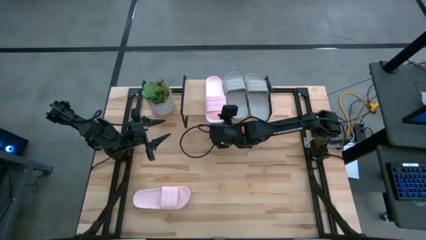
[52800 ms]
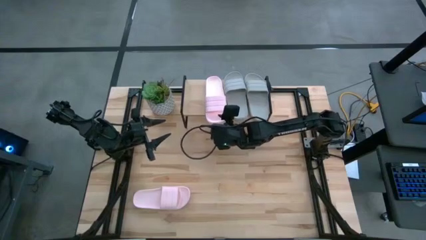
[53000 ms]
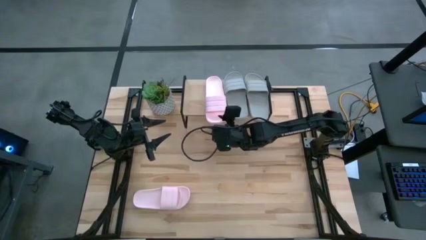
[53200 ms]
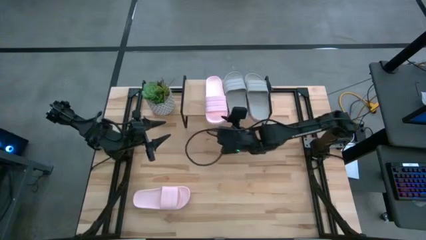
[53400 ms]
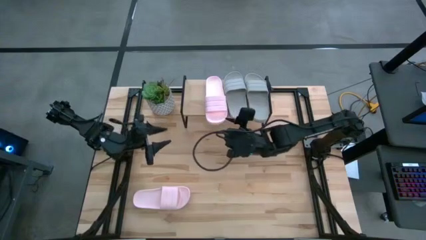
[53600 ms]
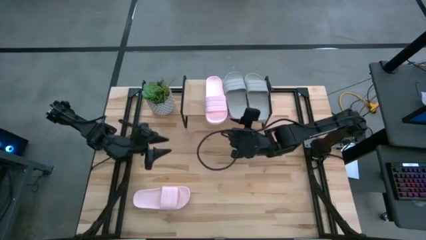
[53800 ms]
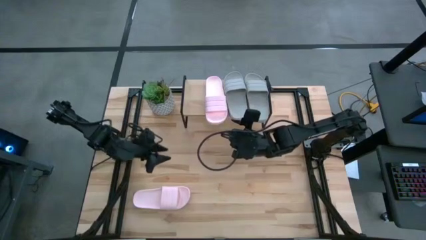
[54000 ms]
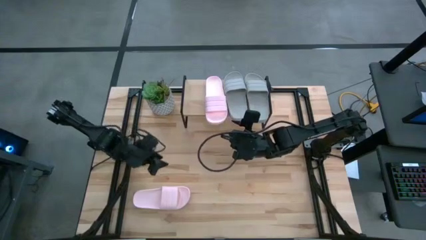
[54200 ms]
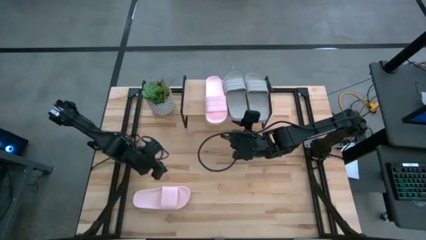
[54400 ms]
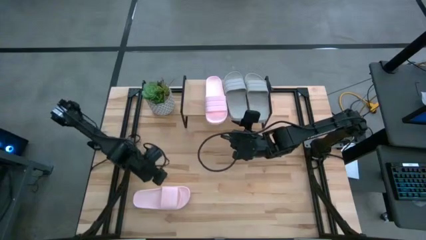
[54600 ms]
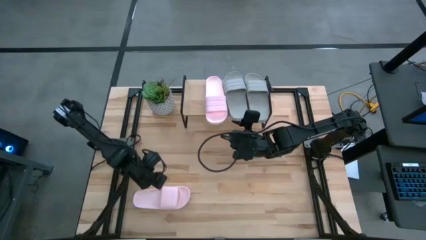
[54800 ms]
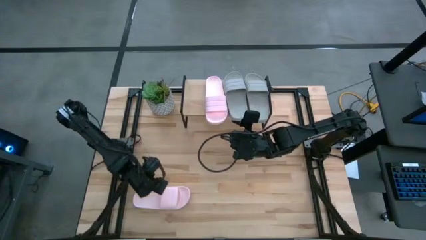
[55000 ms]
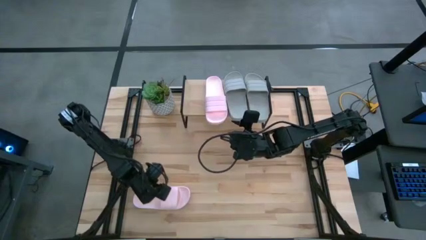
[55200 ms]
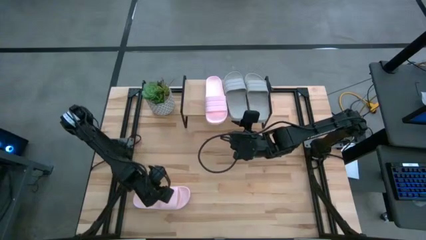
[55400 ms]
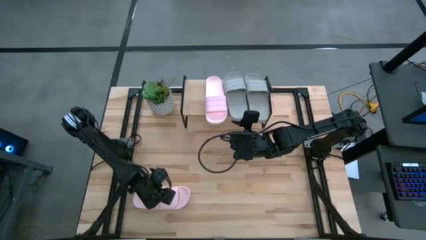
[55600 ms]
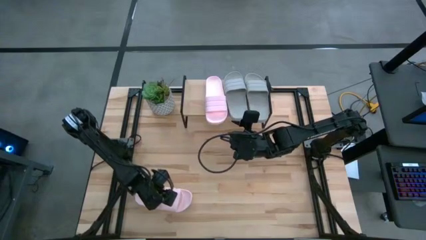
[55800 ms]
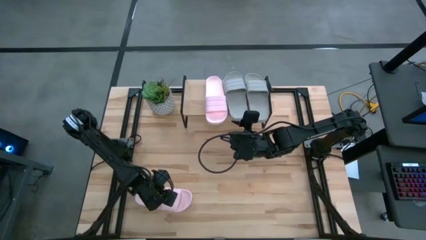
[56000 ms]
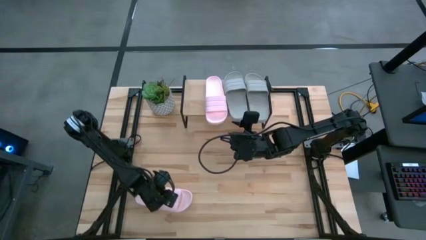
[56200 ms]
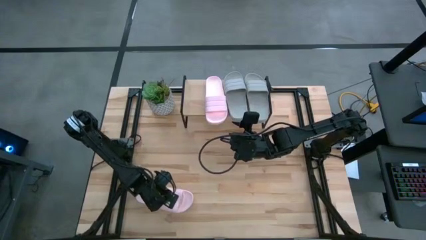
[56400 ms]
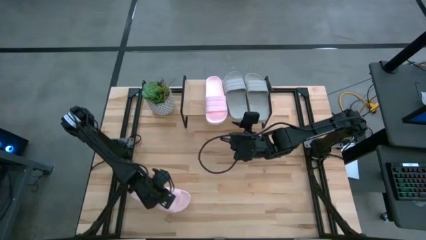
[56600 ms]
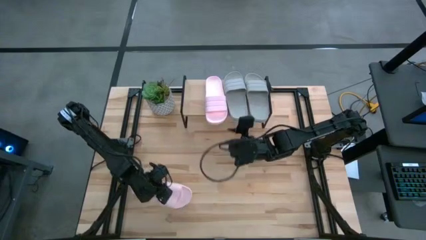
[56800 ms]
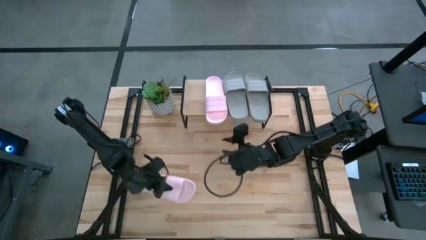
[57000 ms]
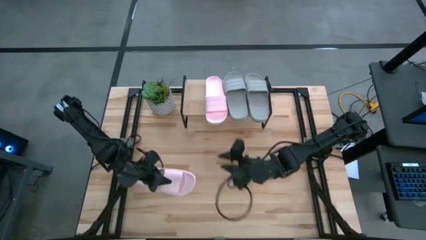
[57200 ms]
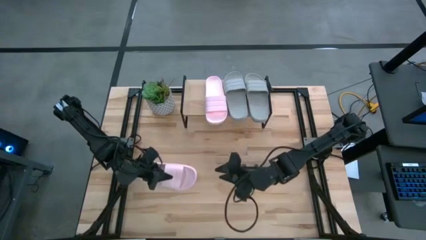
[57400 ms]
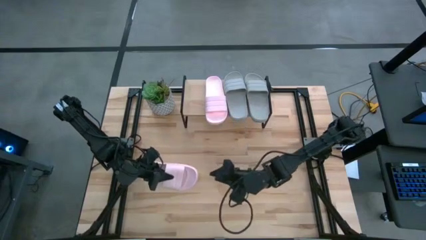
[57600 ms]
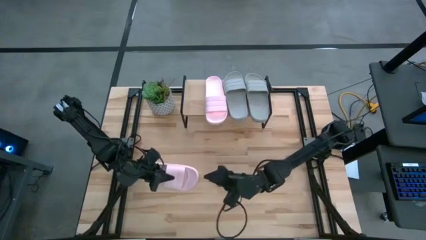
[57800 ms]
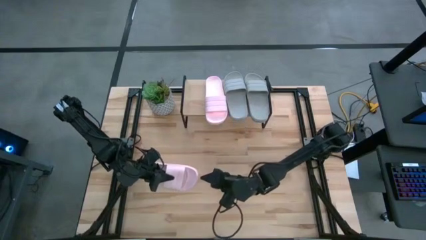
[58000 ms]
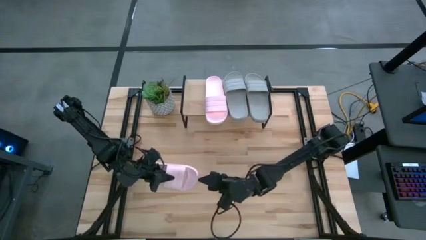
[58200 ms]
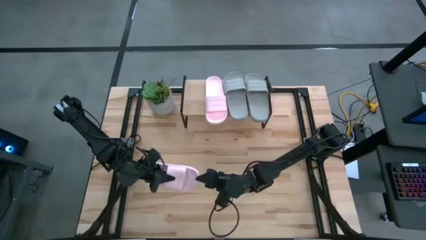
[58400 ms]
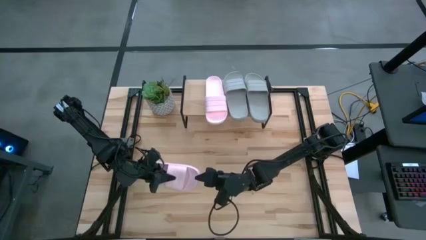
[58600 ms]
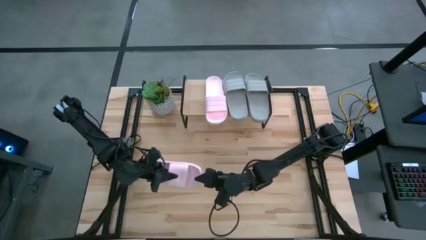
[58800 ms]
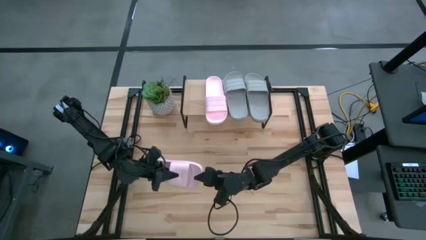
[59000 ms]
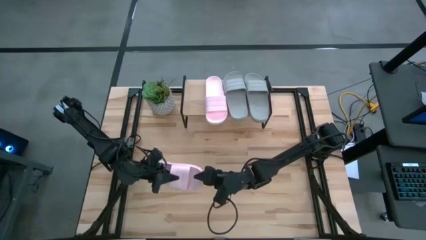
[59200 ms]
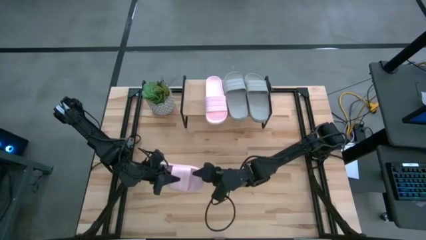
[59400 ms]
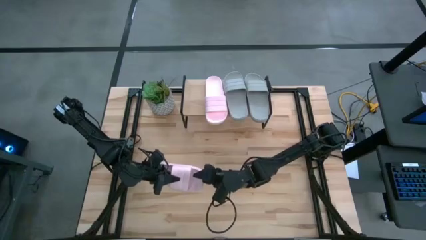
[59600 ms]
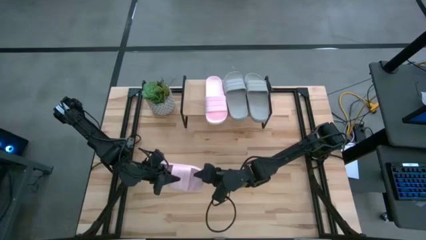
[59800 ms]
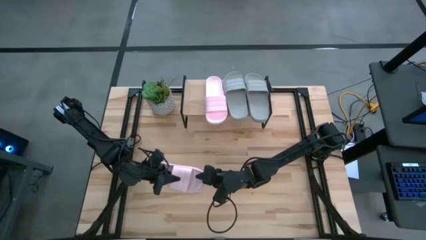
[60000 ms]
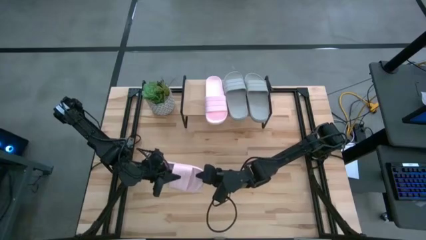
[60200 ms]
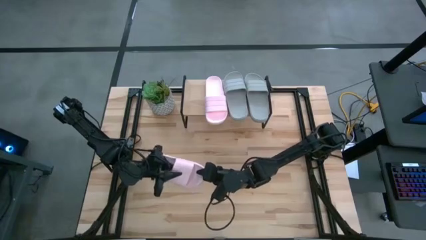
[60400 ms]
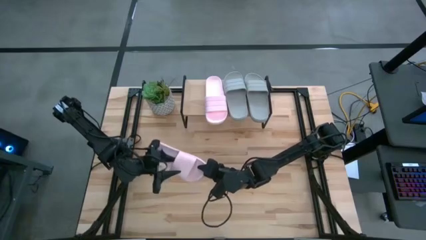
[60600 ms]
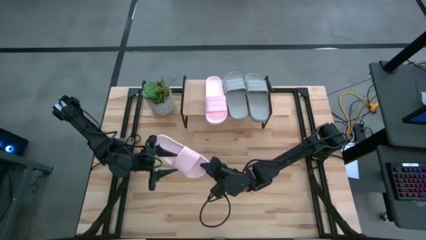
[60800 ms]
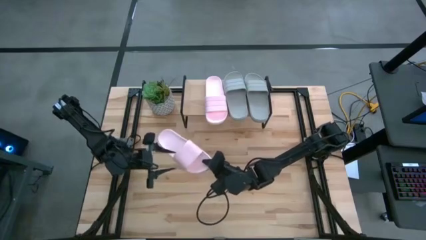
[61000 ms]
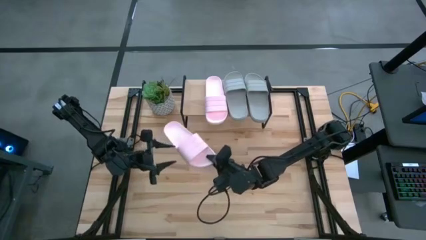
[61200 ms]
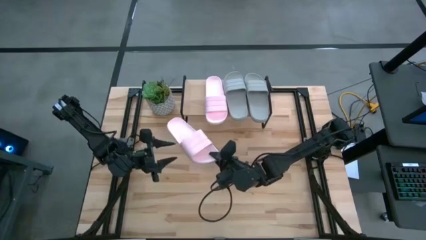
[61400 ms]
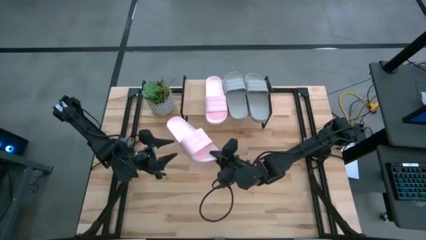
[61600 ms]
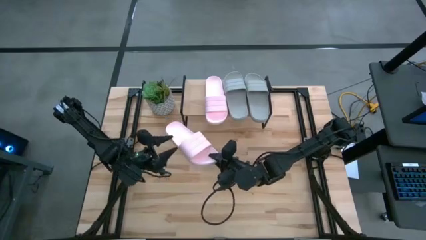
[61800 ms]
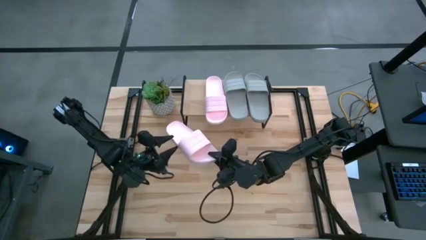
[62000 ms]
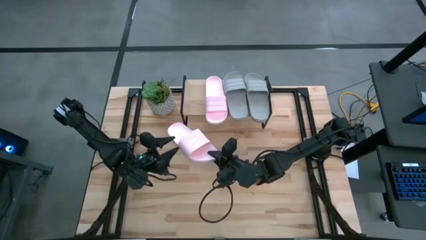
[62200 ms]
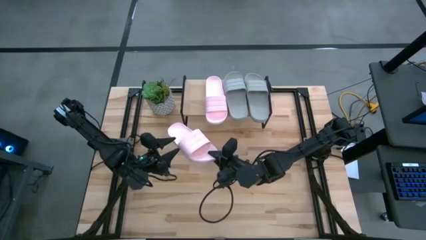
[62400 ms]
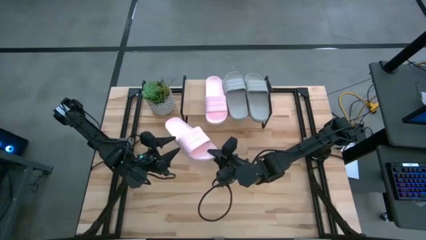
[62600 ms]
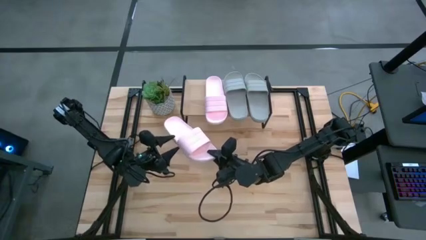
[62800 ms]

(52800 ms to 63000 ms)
Task: Pick and place slides into the shelf
Put the pink slides on the shelf

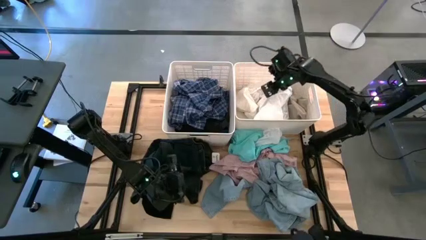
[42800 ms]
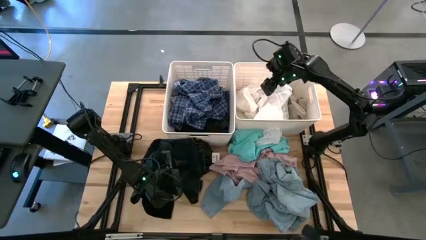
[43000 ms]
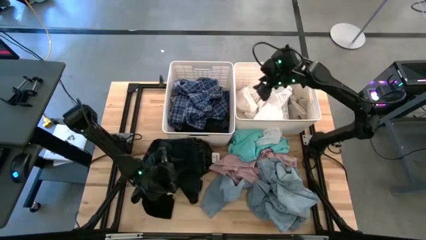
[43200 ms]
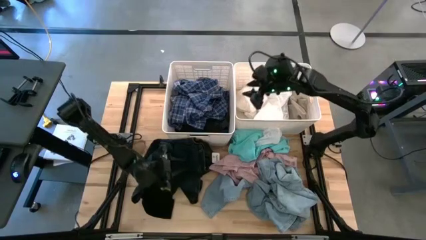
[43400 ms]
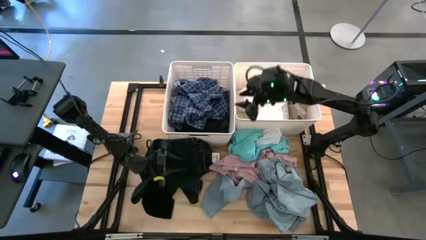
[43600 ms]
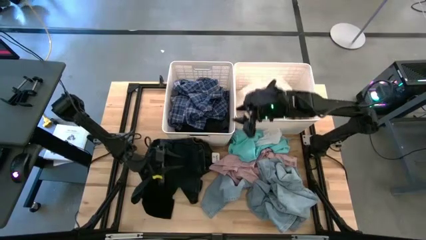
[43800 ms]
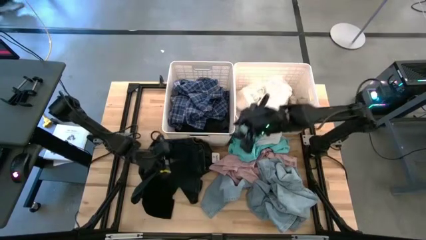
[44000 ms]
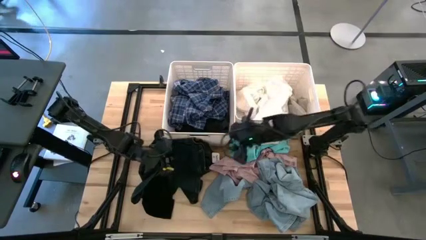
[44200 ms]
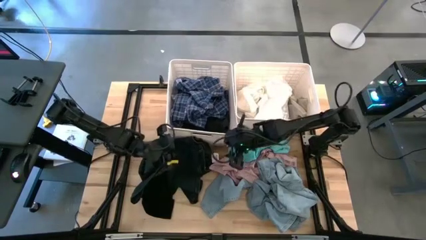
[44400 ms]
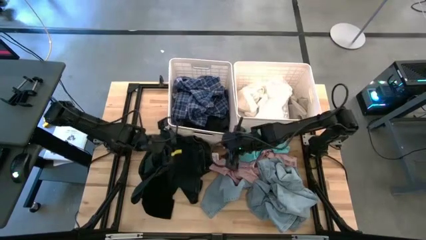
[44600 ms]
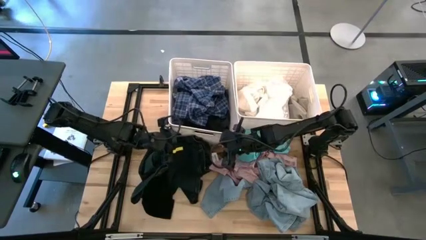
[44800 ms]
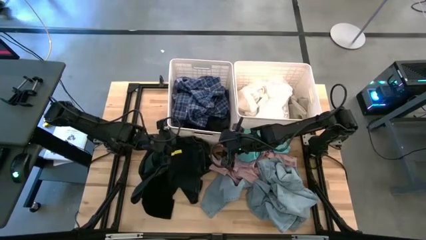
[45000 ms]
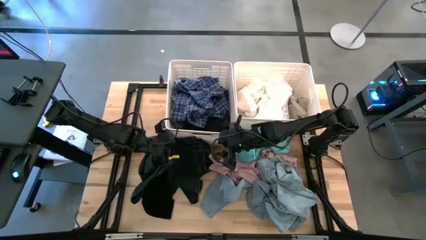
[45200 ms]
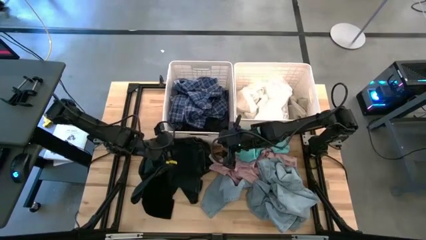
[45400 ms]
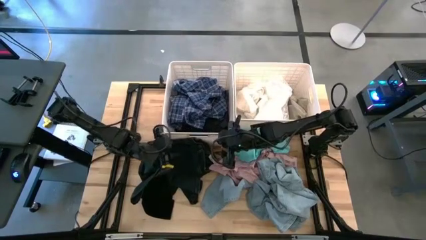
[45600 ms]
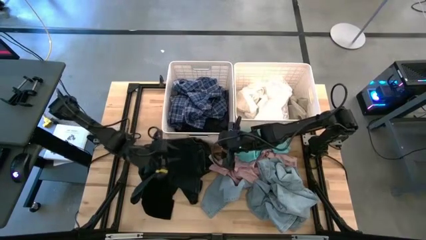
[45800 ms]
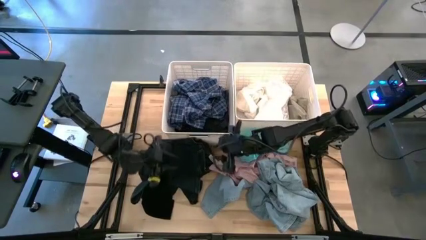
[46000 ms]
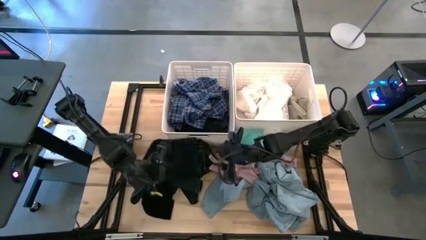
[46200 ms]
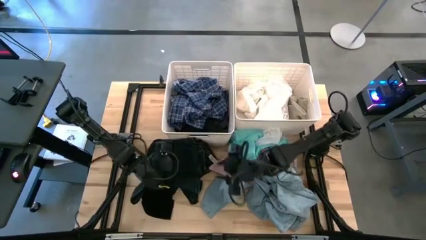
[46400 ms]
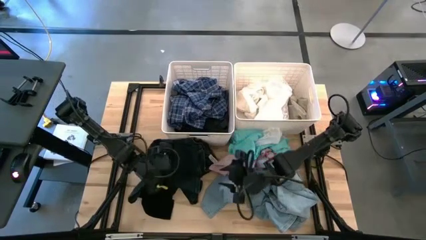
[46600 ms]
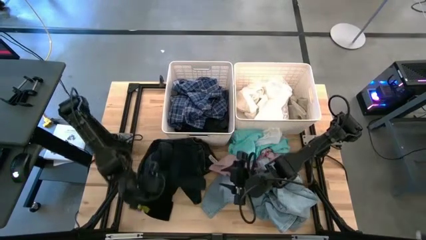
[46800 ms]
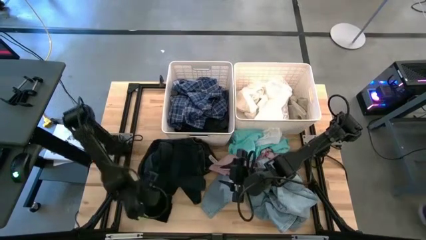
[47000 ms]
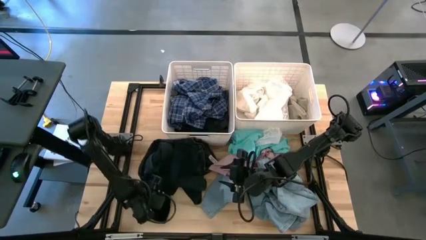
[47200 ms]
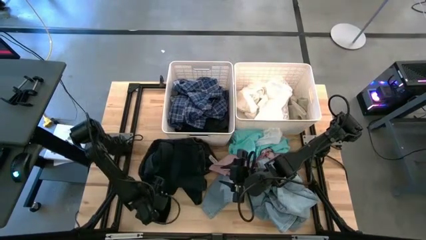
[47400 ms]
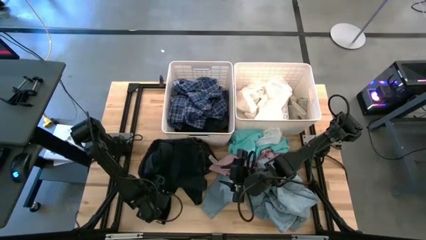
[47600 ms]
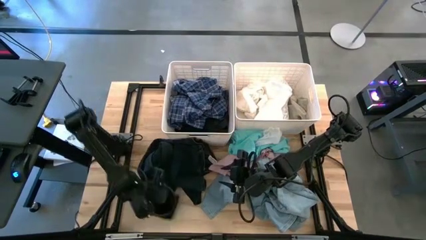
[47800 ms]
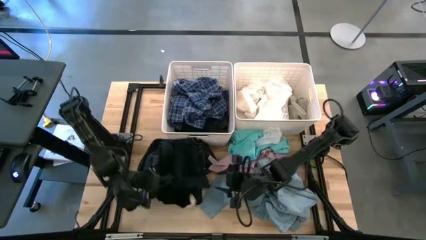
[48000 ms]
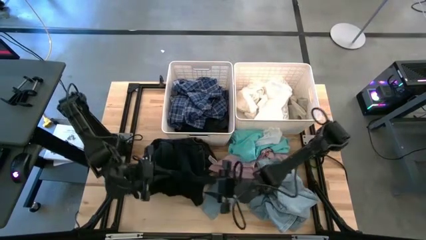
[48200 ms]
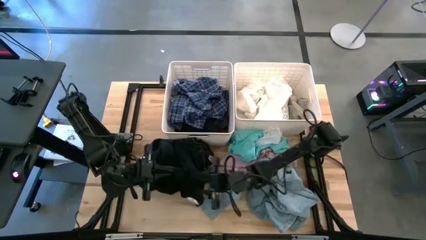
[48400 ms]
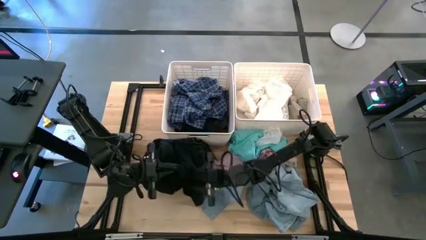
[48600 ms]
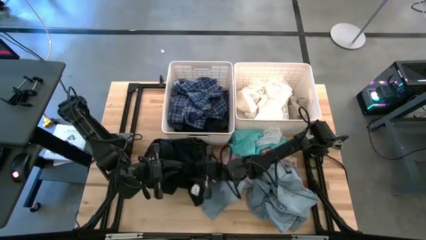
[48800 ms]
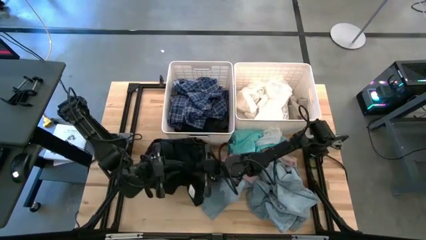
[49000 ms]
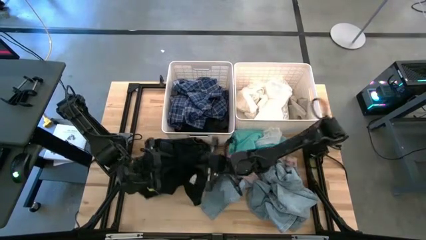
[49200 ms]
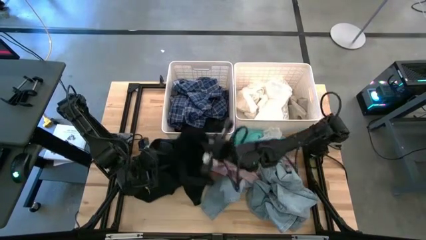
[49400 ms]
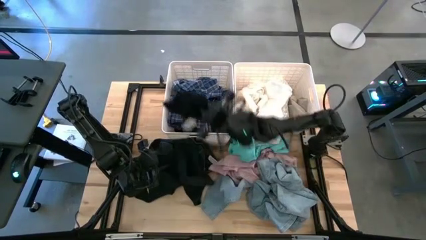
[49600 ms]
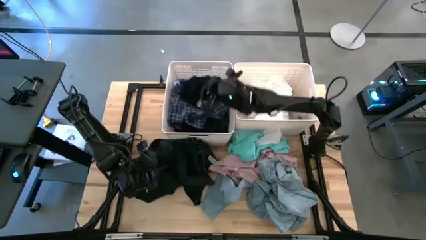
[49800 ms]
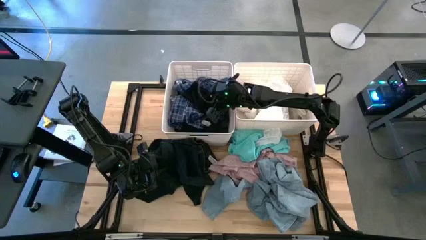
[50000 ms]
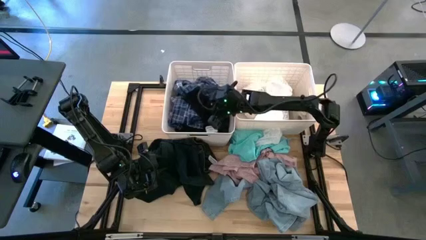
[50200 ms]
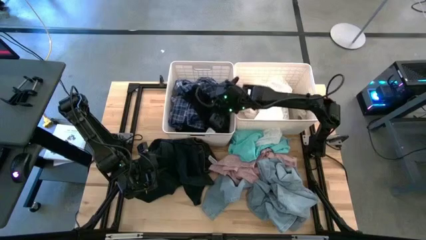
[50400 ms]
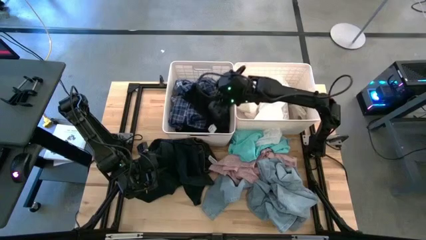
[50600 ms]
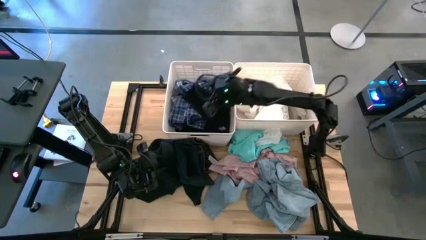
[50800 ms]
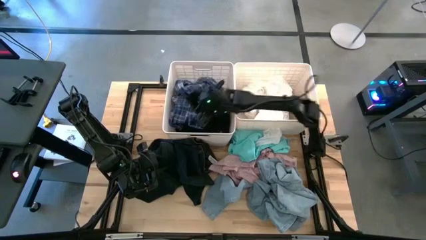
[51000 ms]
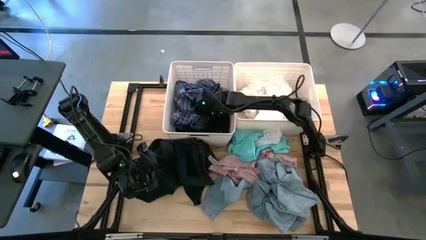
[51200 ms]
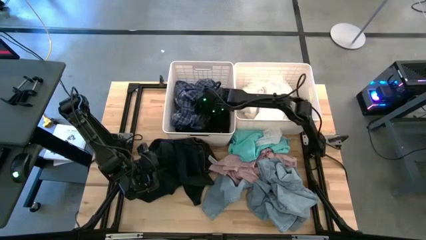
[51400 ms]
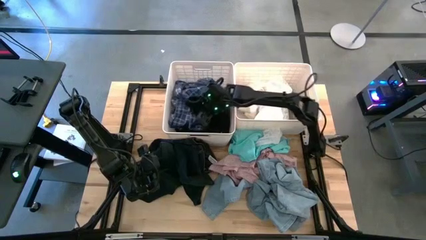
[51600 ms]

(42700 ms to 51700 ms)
Task: Sort clothes
Put the black underwear into the left white bin
